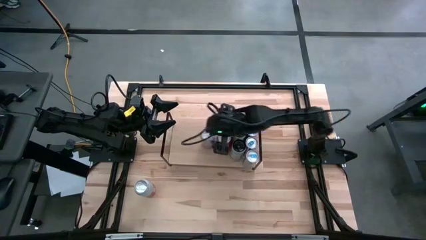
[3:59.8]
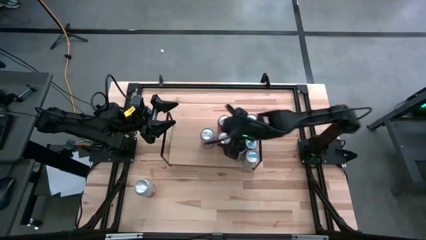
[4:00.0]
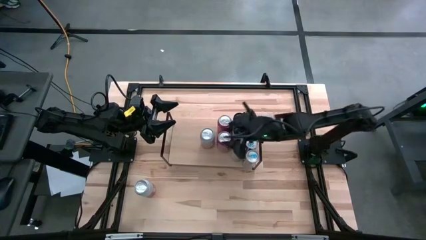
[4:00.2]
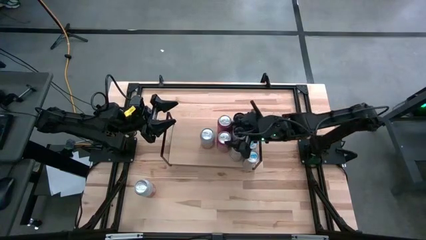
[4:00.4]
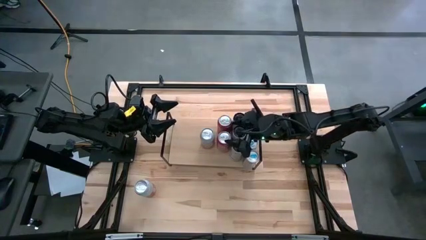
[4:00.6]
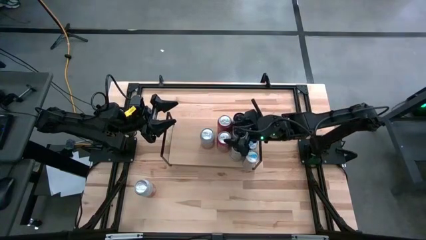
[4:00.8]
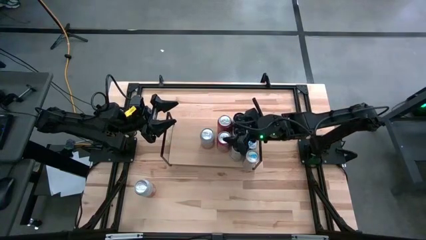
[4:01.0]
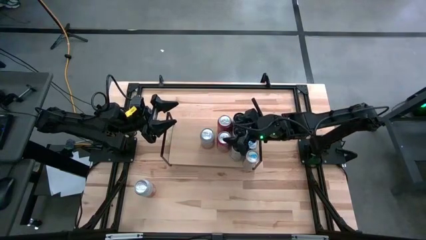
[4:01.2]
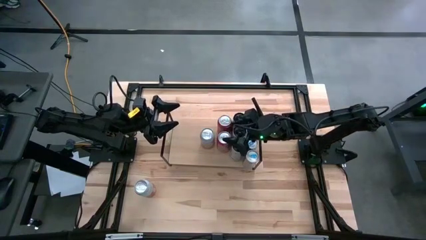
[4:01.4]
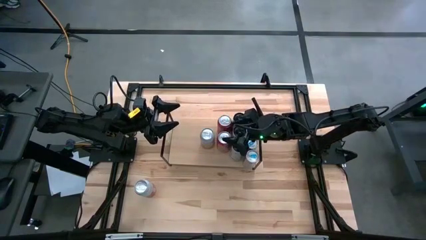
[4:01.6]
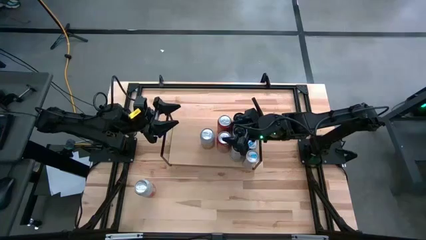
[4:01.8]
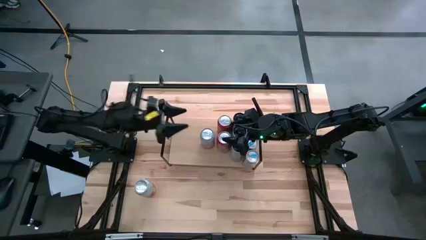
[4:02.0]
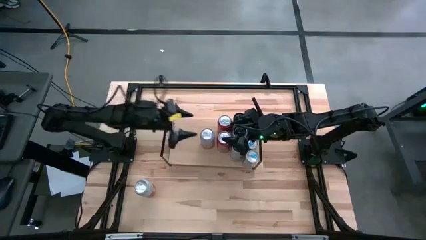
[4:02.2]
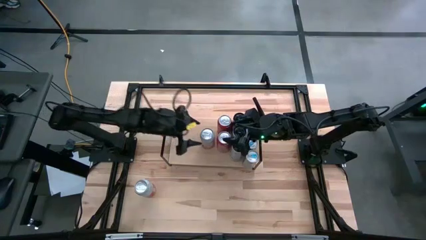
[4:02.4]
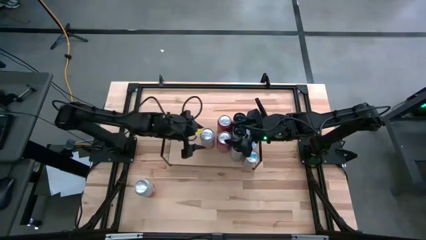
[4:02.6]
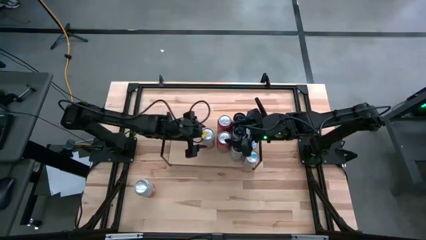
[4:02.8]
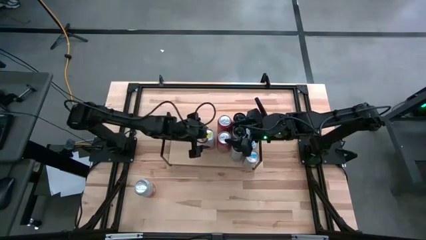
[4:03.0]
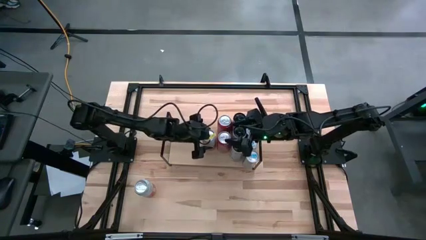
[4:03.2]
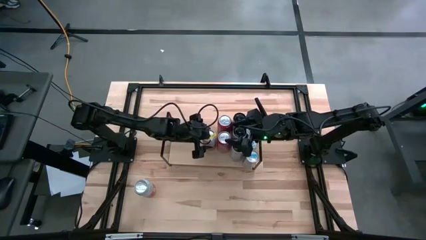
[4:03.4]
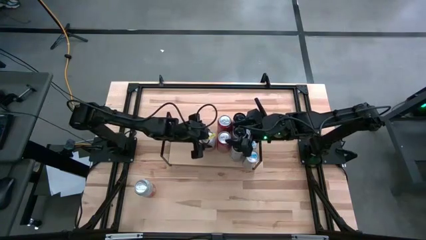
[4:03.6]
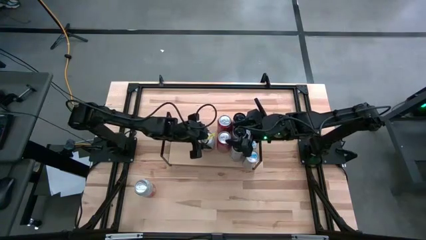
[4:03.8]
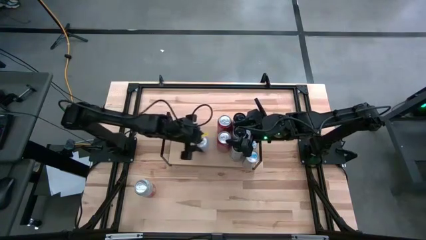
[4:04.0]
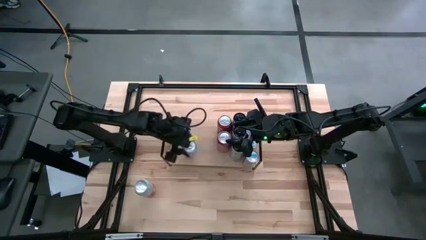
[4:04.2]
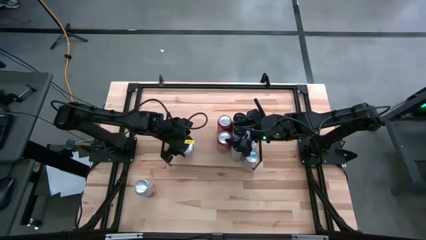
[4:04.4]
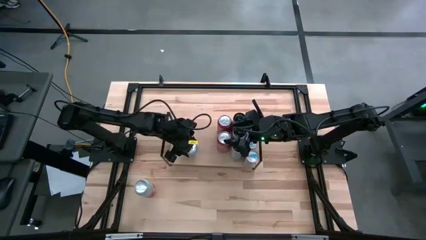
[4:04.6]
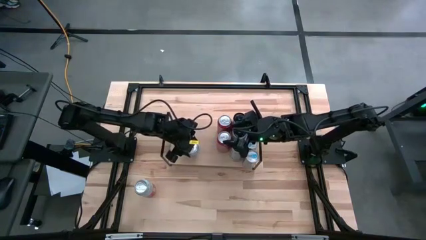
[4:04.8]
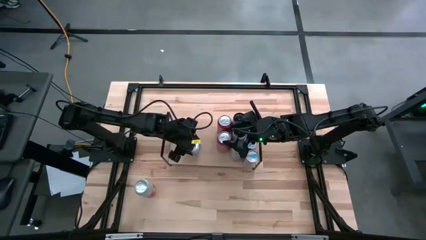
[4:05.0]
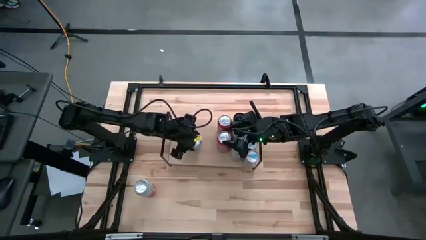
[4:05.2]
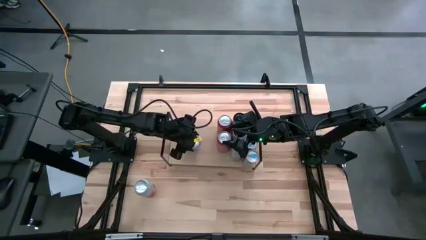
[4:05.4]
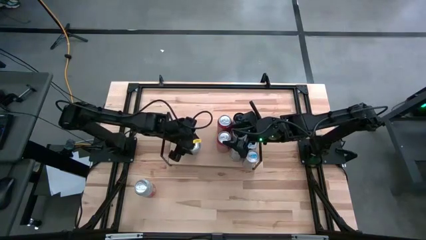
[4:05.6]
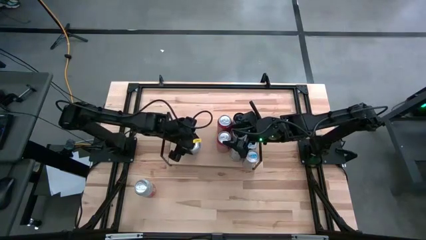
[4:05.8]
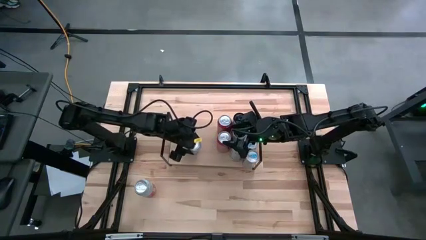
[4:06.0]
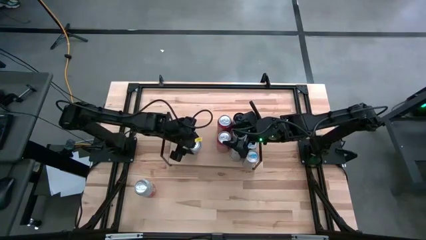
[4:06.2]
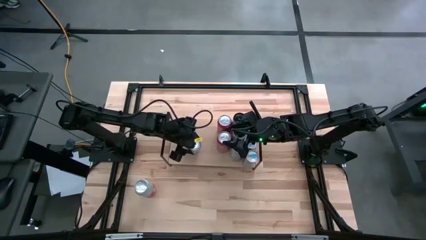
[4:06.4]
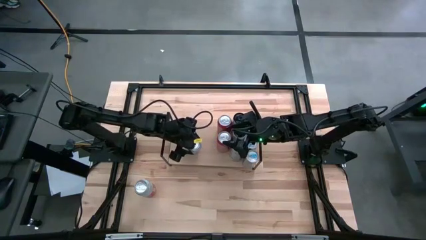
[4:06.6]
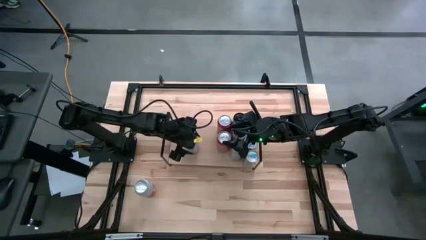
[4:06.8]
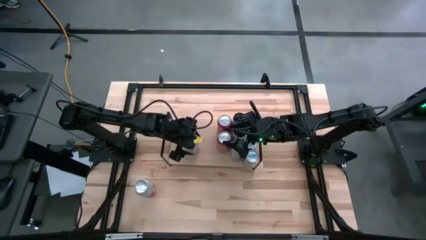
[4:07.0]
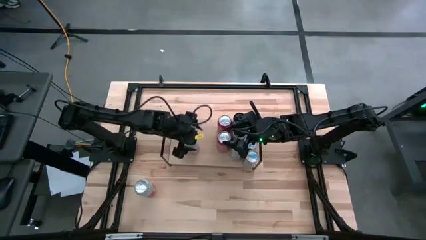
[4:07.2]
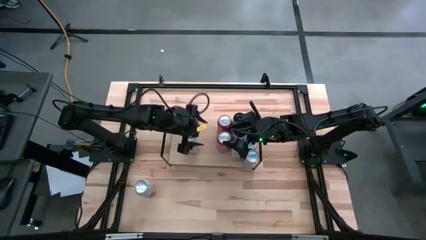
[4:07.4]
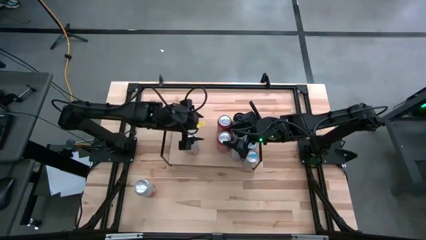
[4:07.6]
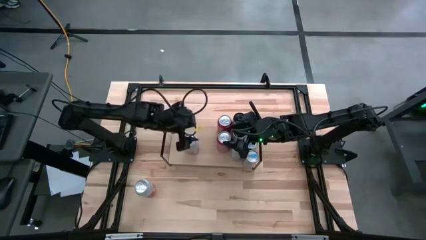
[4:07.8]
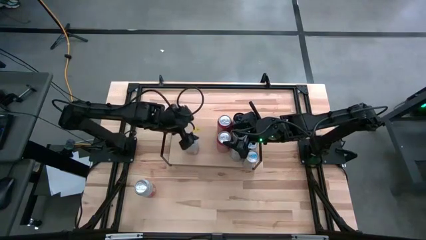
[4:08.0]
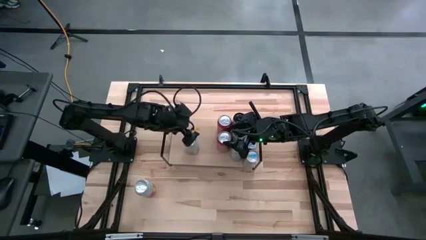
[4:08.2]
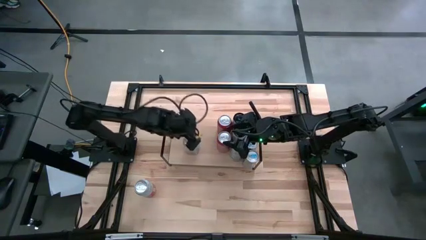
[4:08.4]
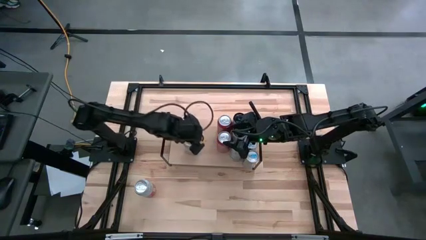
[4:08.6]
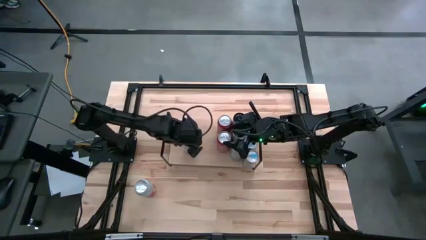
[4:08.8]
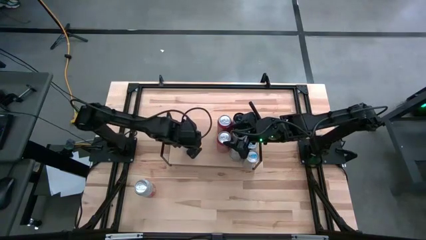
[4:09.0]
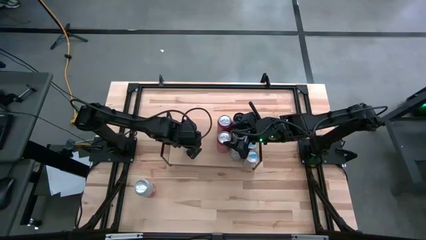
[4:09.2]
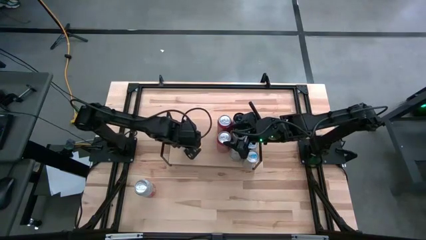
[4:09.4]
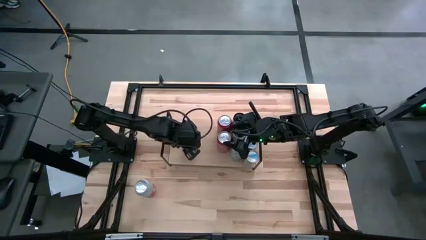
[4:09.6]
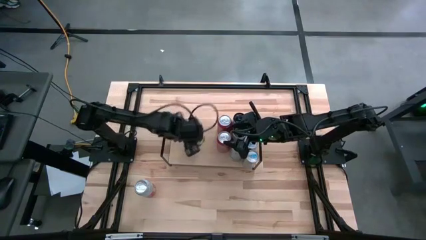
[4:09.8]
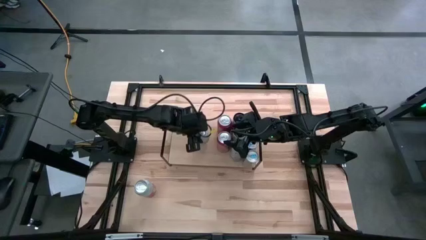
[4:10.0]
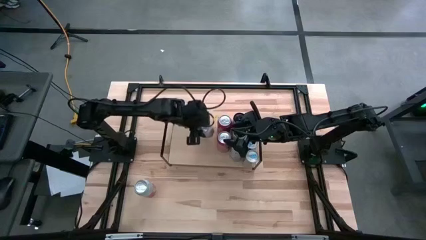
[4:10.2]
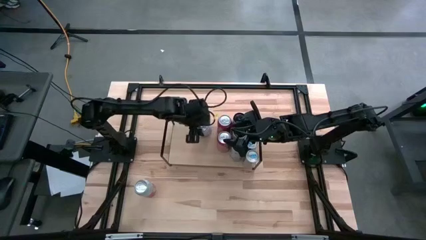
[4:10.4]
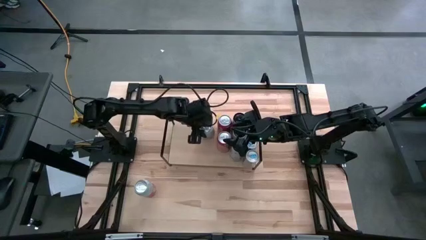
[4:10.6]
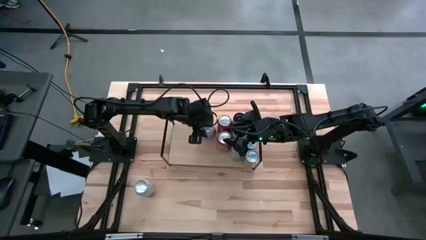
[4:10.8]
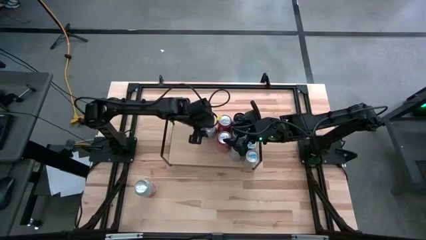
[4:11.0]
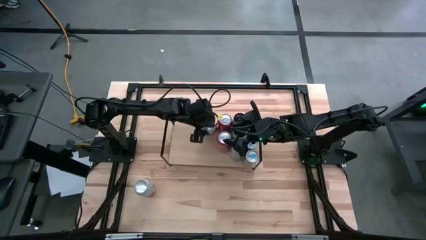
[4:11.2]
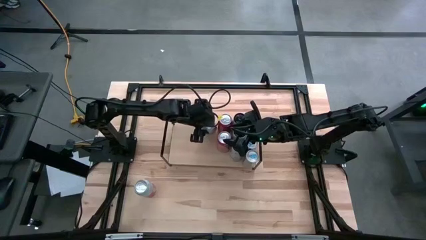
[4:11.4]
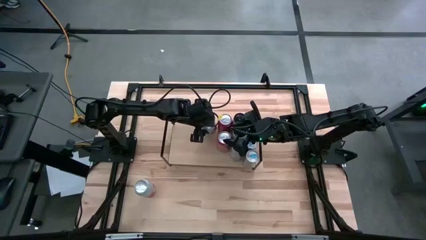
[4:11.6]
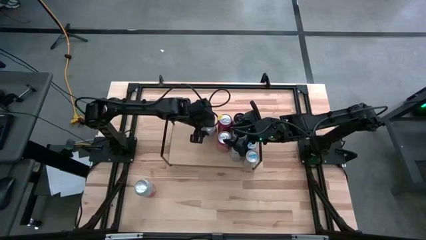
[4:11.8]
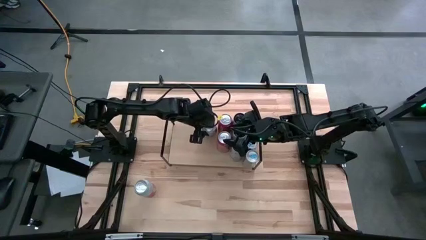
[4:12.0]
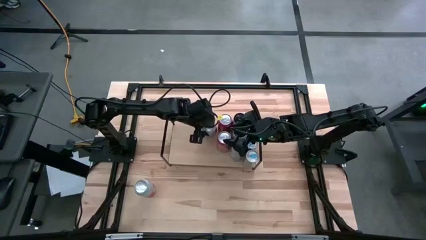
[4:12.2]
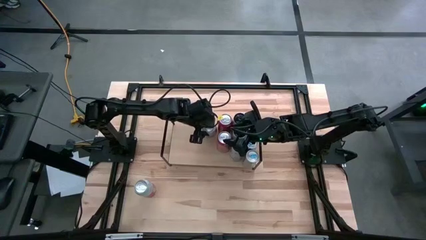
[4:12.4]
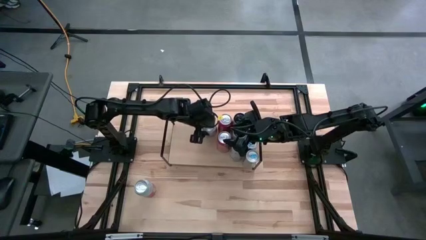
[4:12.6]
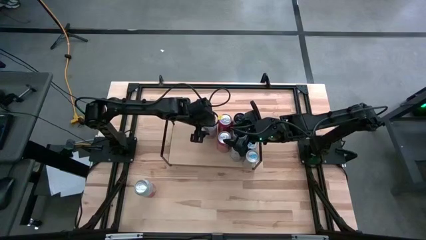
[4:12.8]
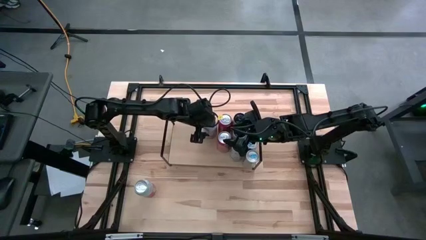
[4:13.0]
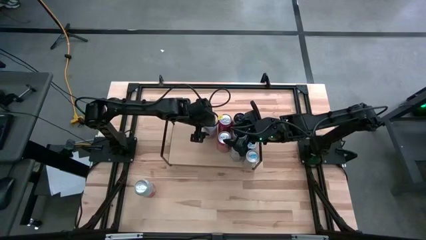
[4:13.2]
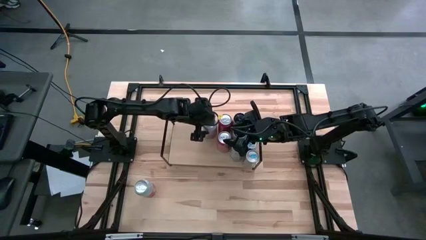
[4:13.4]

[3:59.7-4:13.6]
Task: Place canned beverage on shelf
Put the pink soda can on the shelf
